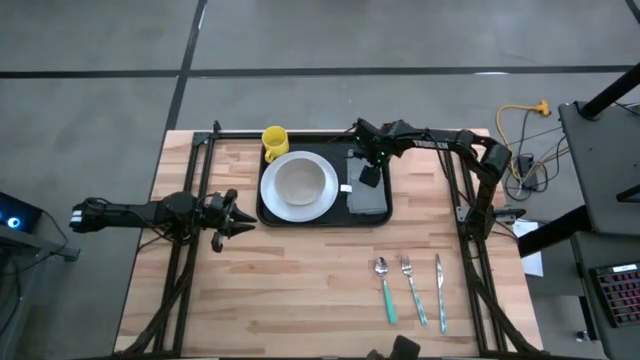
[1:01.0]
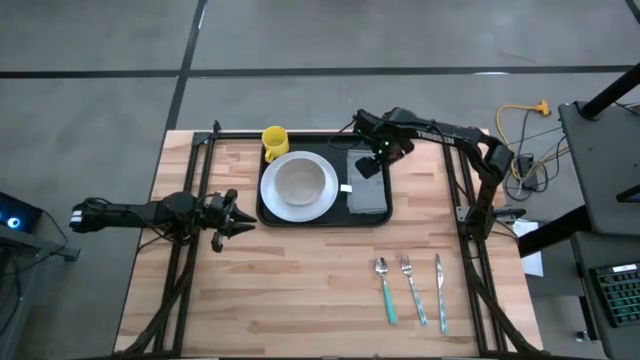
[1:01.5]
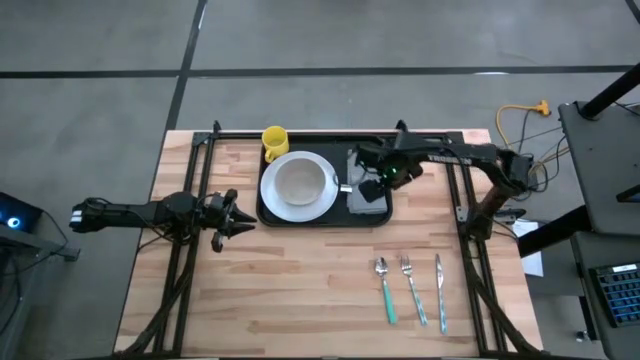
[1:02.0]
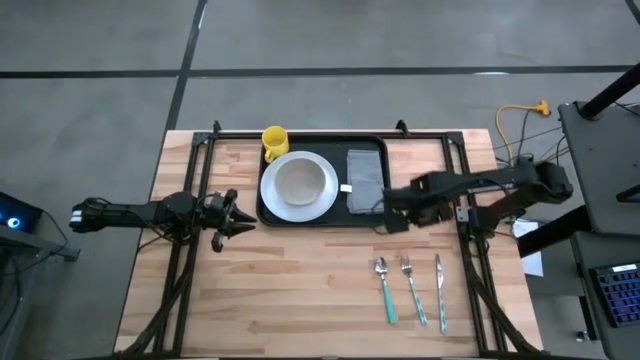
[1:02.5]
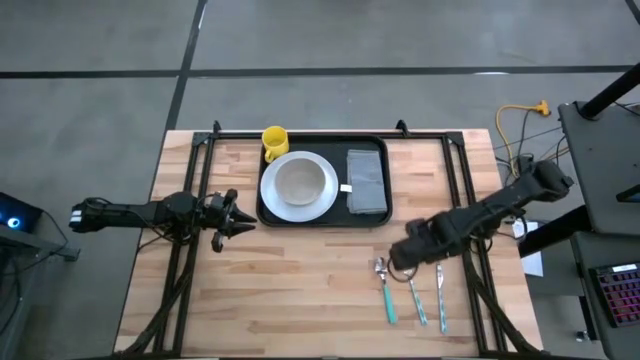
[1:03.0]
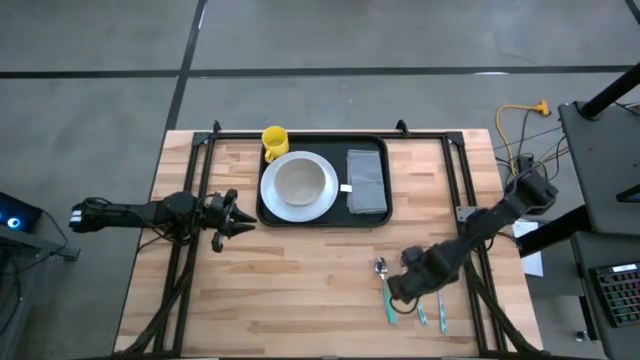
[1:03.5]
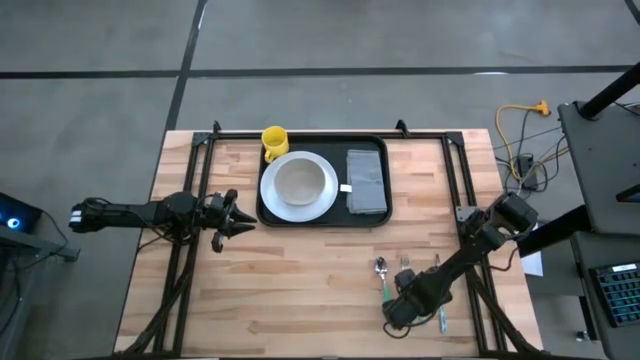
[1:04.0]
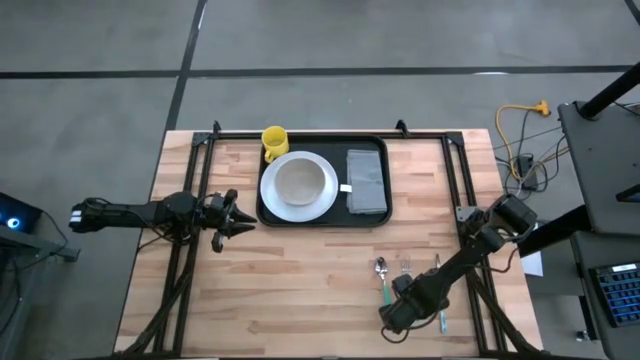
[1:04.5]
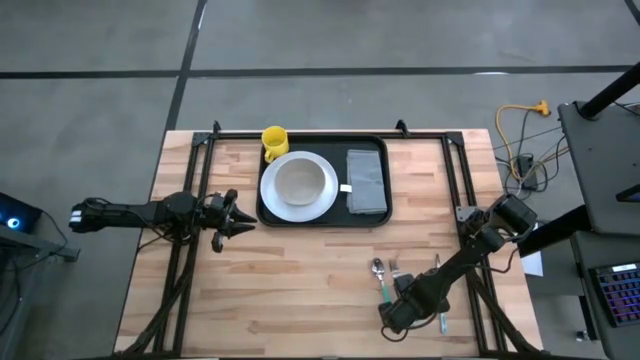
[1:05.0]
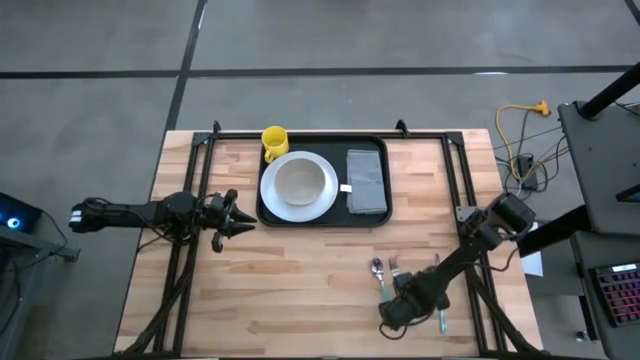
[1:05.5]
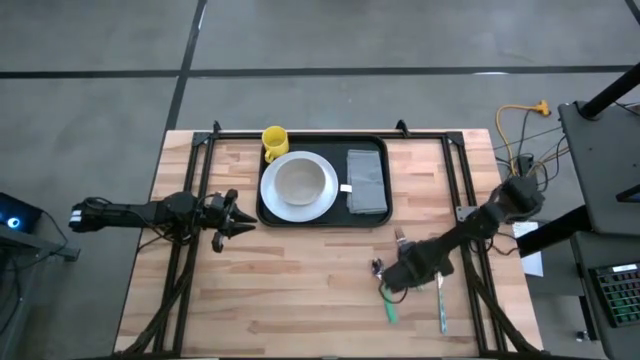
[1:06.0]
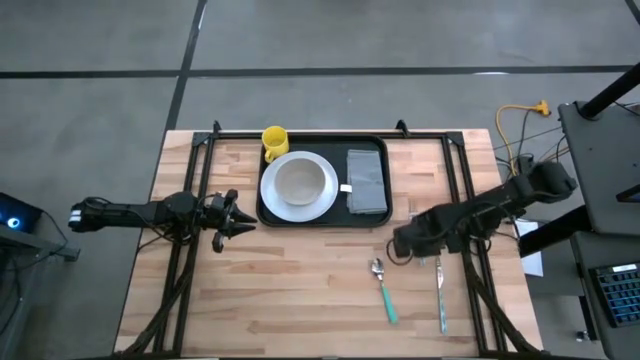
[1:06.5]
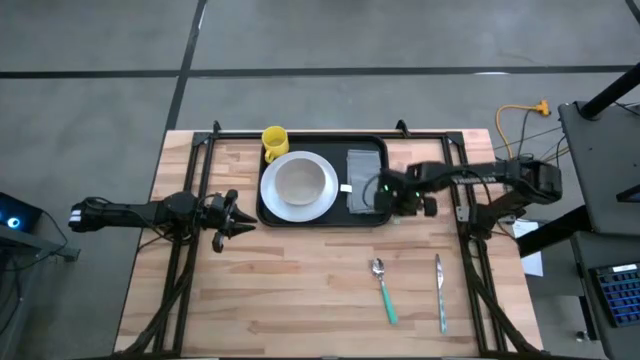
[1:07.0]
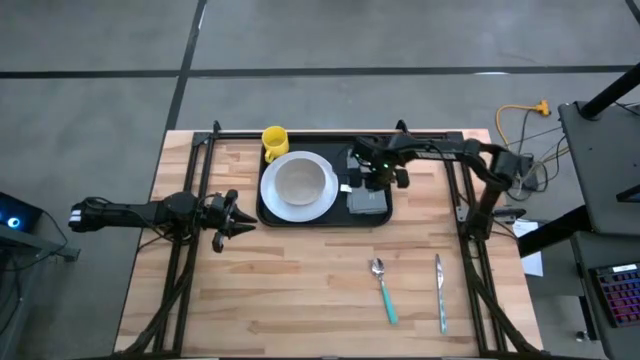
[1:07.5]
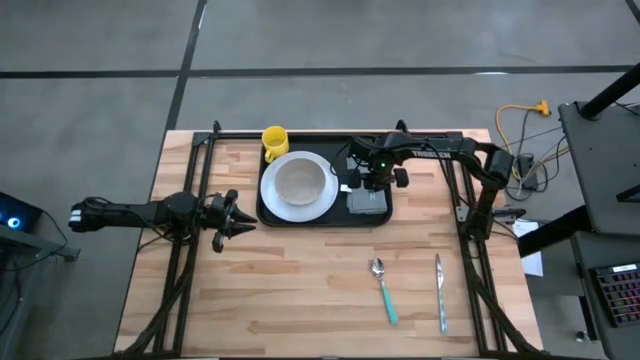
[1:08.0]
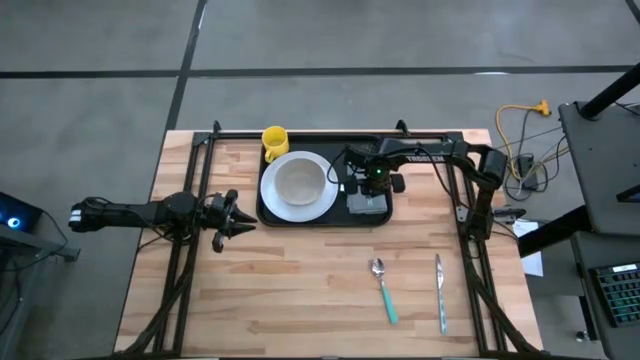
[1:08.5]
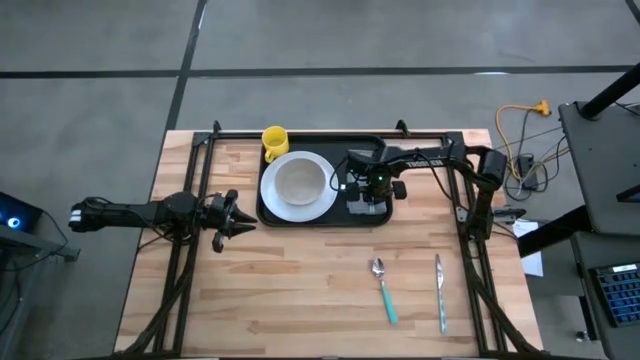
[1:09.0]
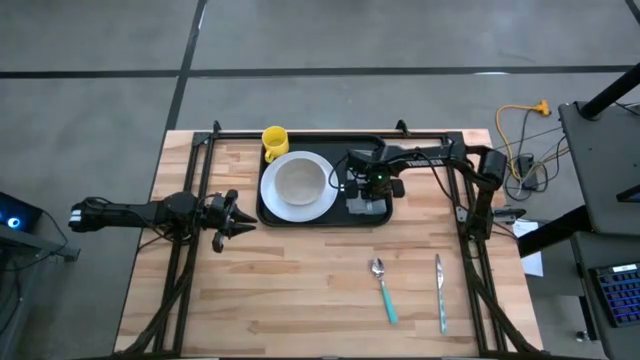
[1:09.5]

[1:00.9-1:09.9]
Task: Set up tray
Put the blue fork on top of the gray napkin on the black serving tray

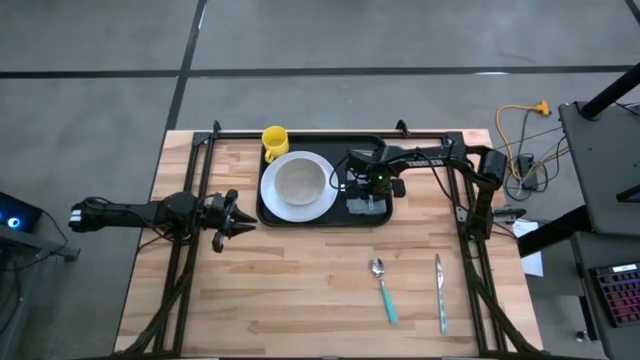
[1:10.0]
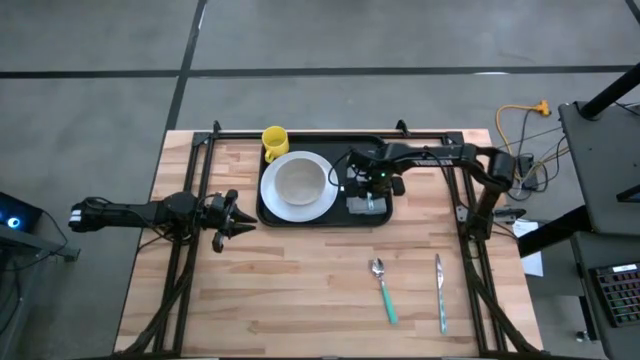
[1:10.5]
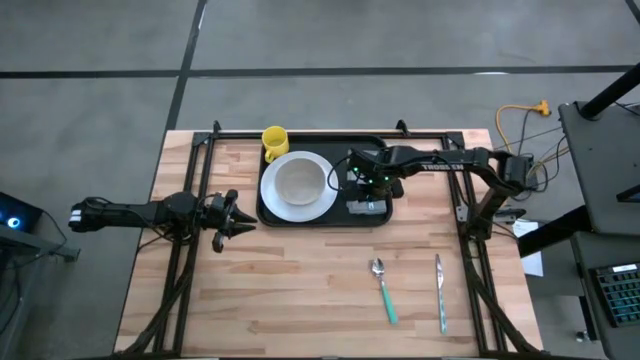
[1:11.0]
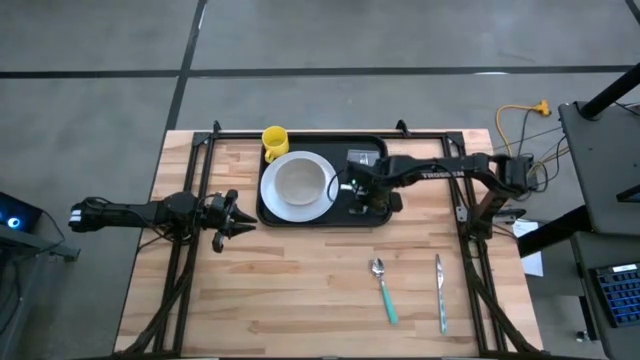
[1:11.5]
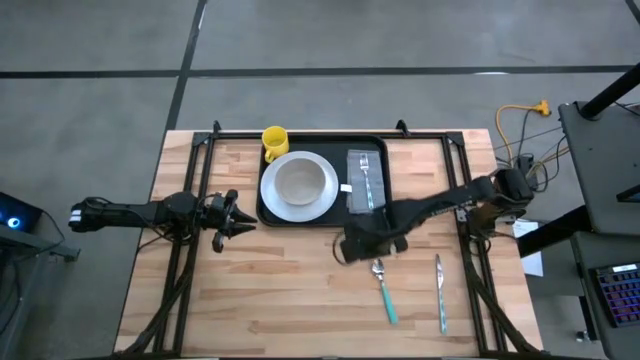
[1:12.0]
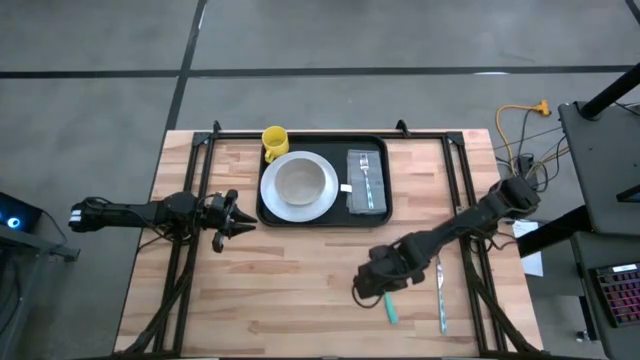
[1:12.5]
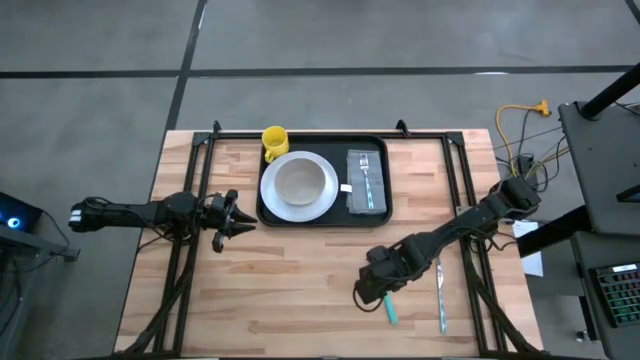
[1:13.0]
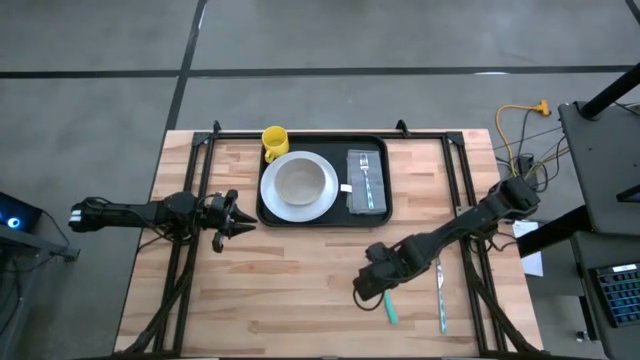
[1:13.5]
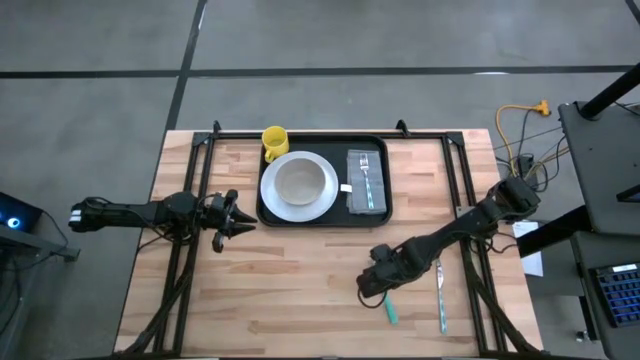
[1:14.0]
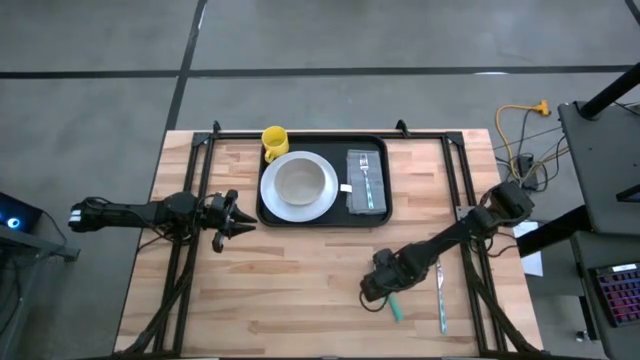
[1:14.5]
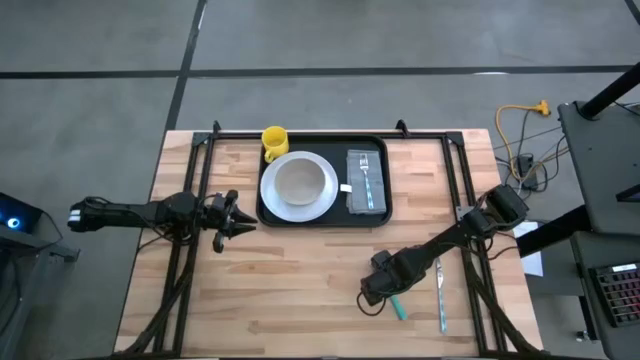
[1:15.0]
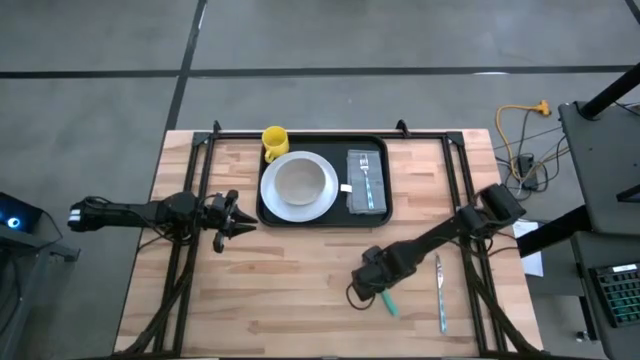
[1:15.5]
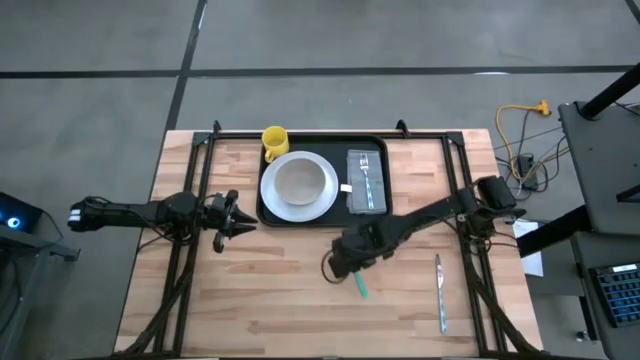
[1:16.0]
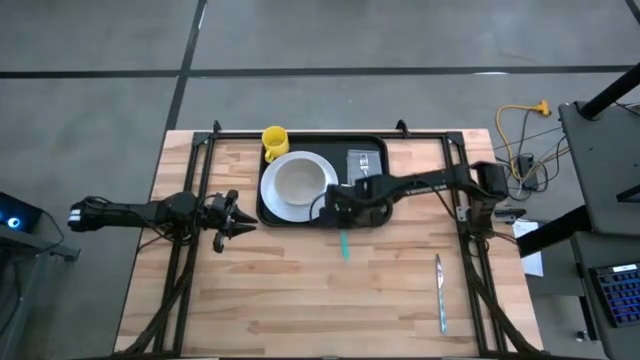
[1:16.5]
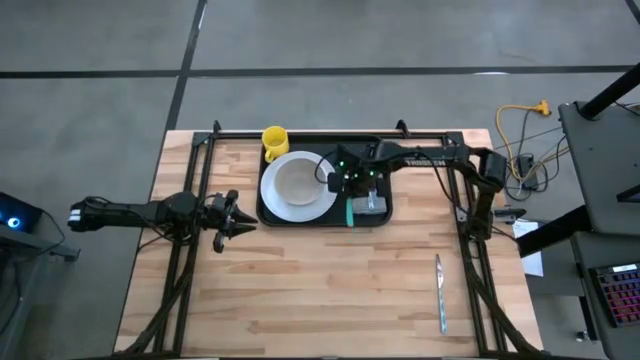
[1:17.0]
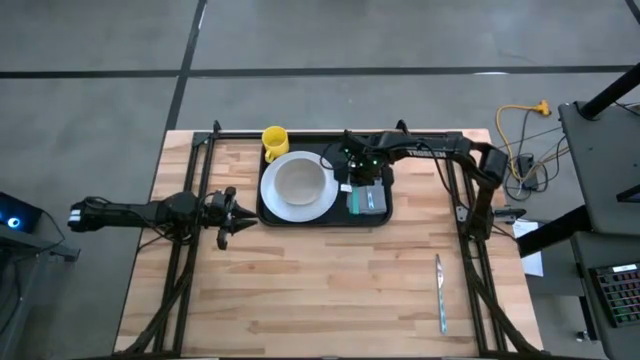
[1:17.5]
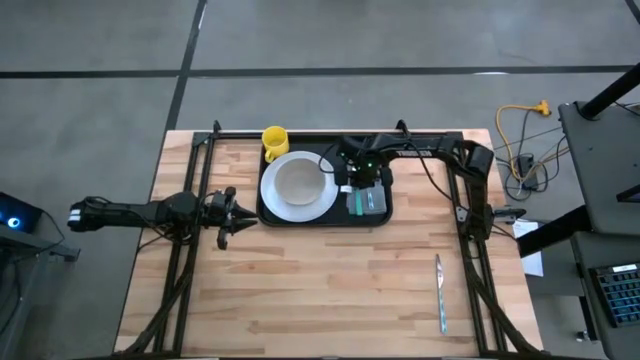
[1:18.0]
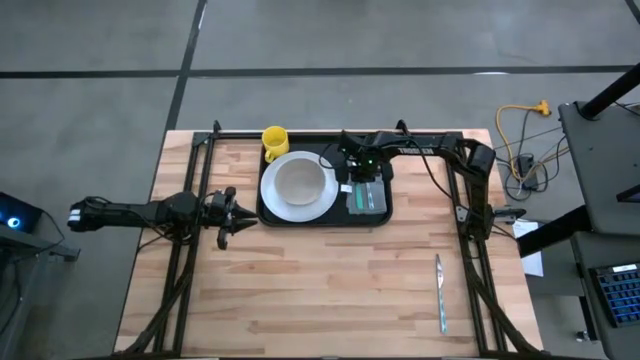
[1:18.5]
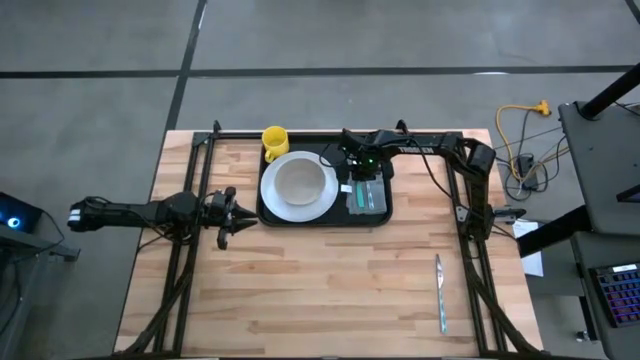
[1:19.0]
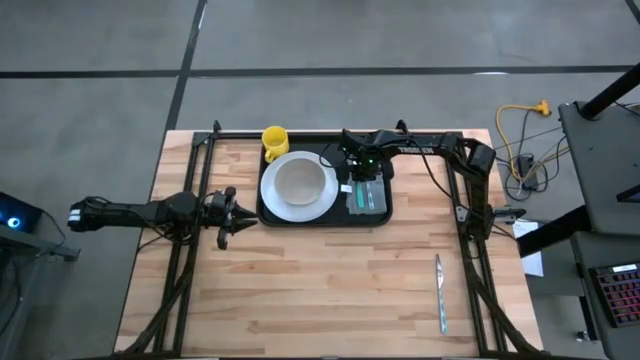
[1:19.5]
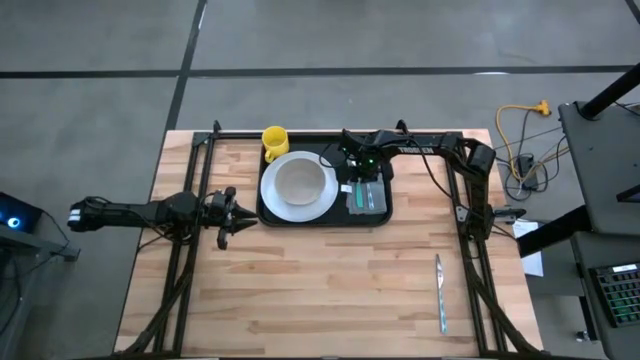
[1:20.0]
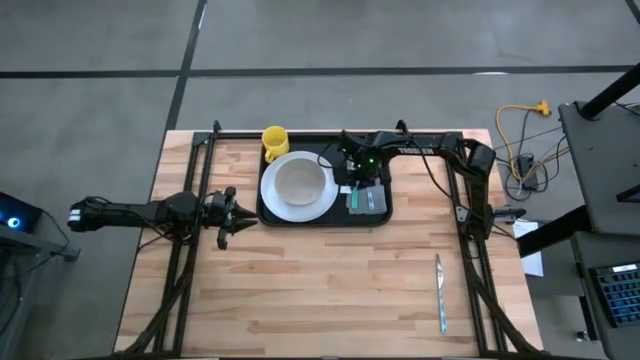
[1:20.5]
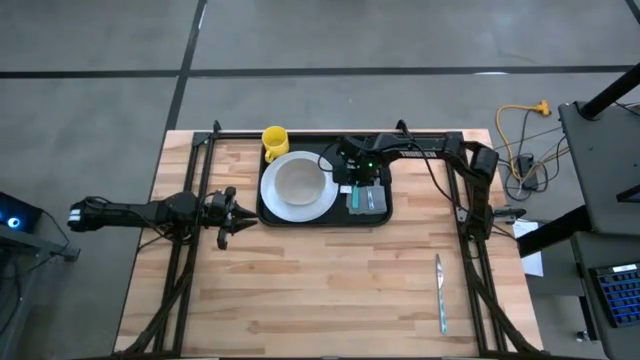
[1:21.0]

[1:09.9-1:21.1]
Put the white patterned spoon on top of the gray napkin to the left of the blue fork on the black serving tray
